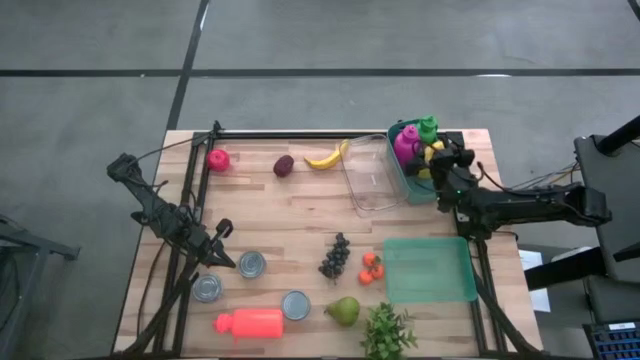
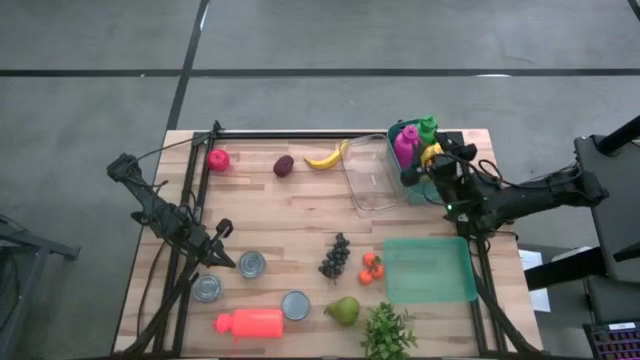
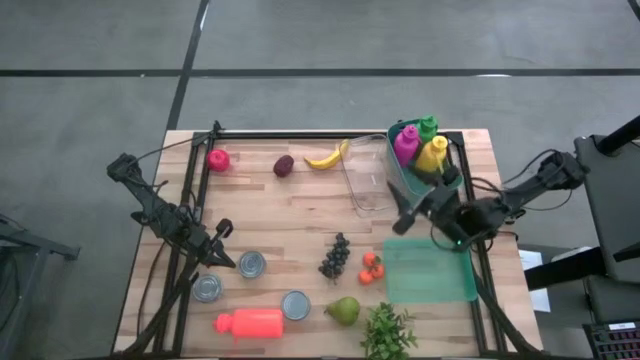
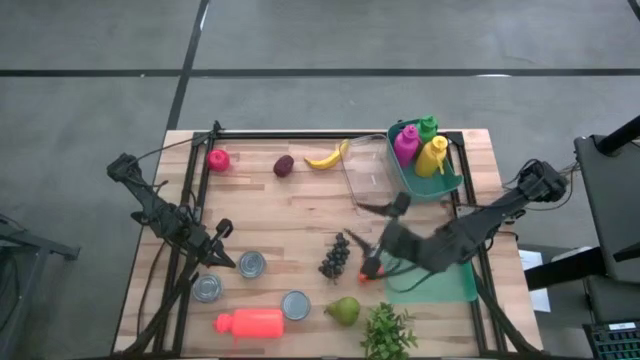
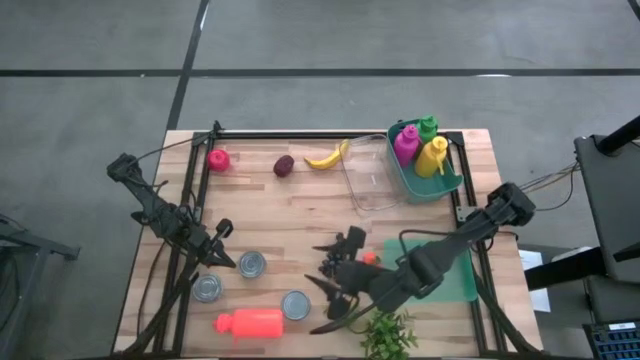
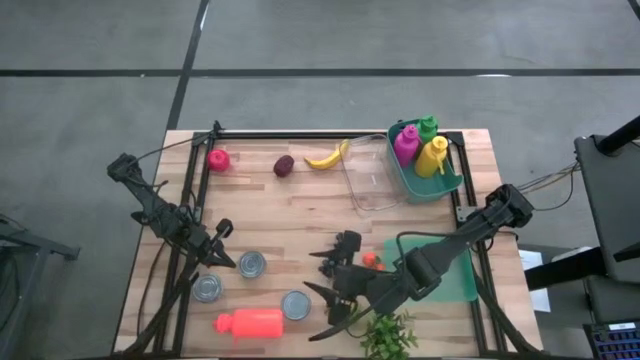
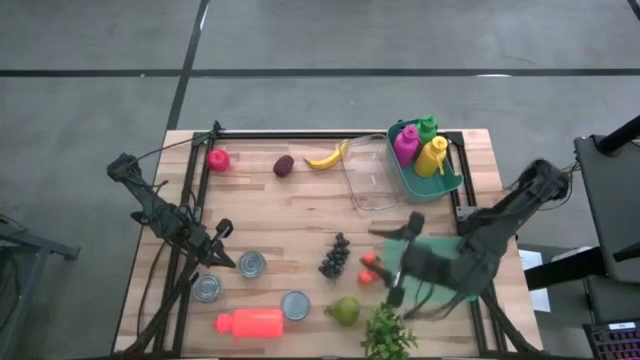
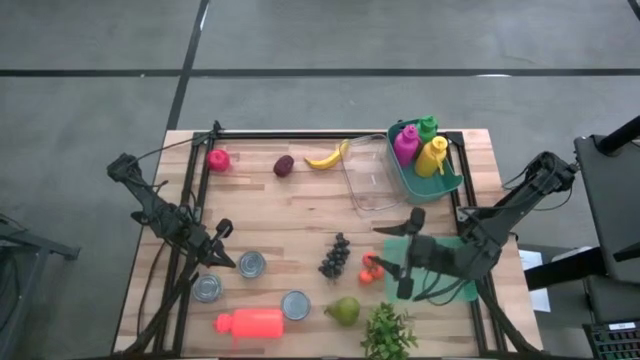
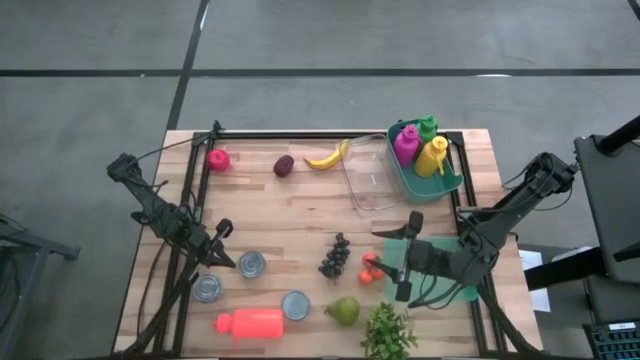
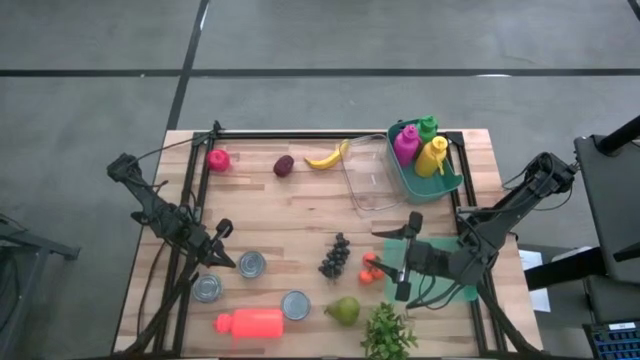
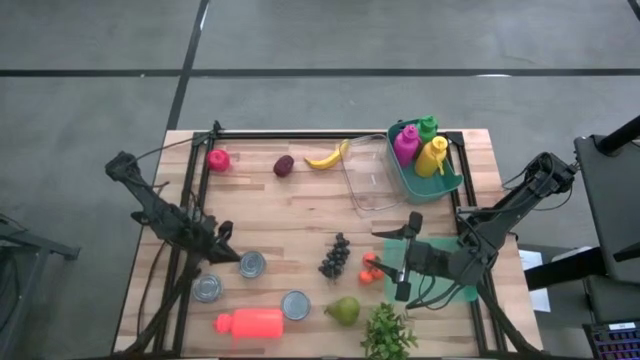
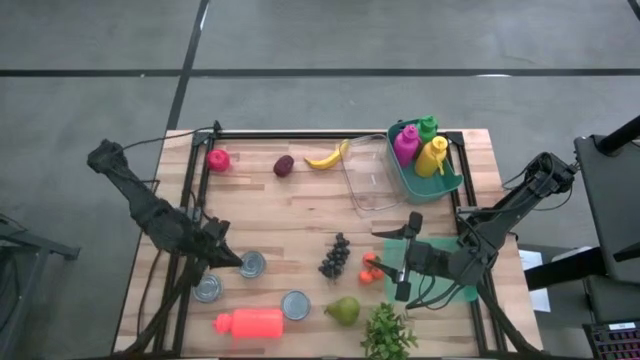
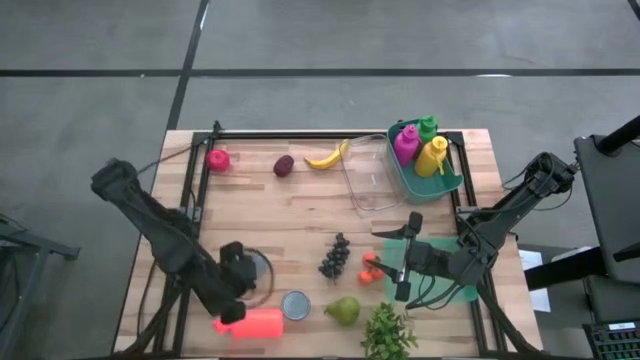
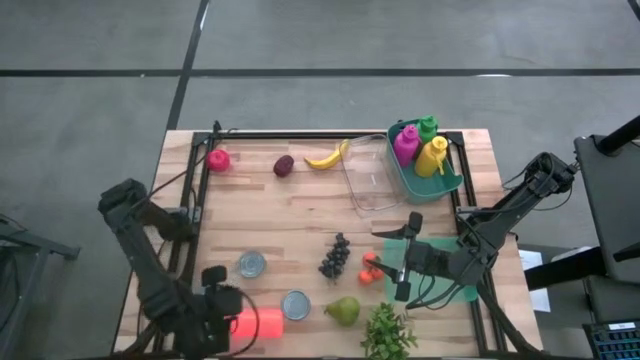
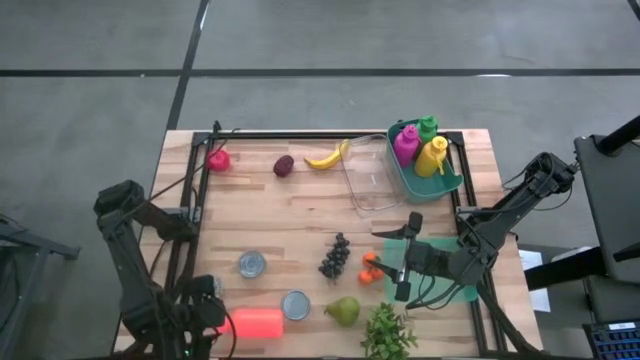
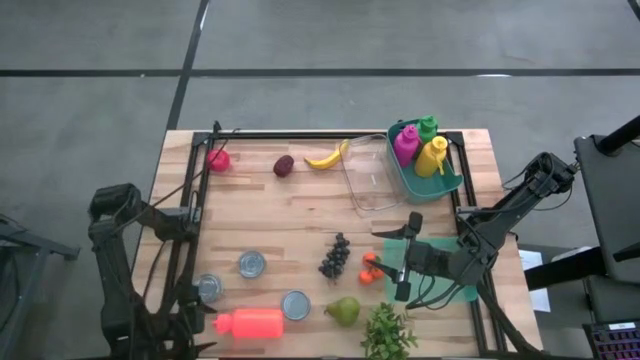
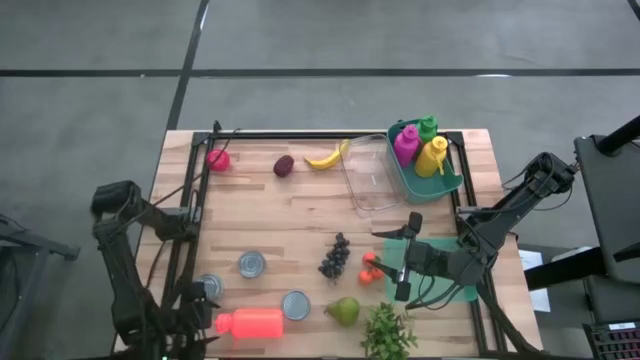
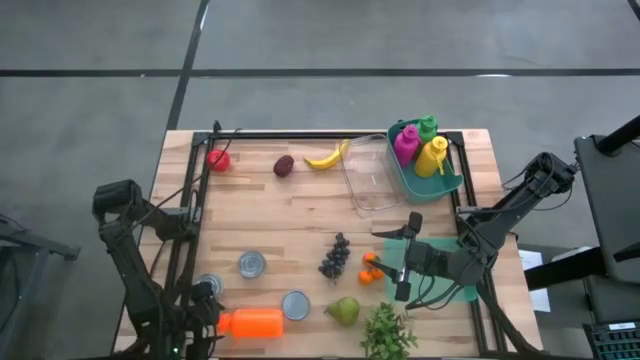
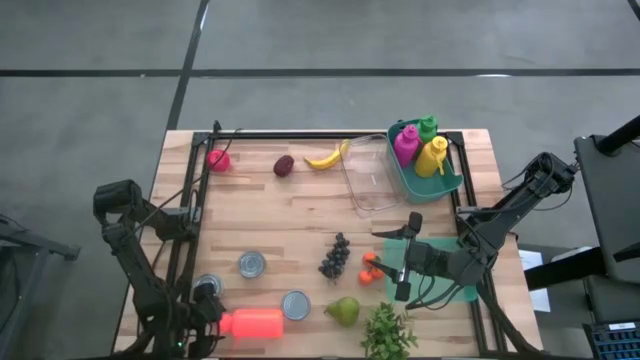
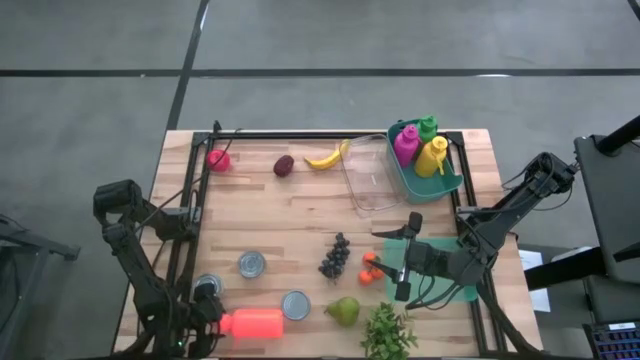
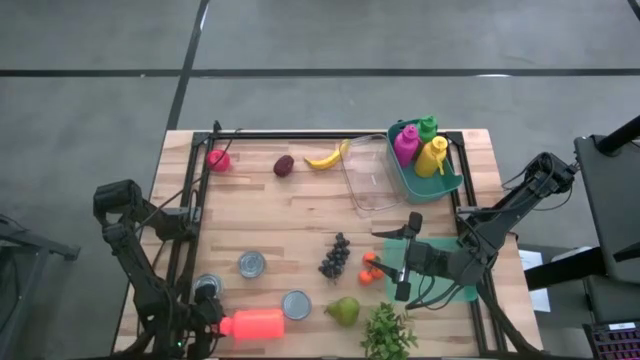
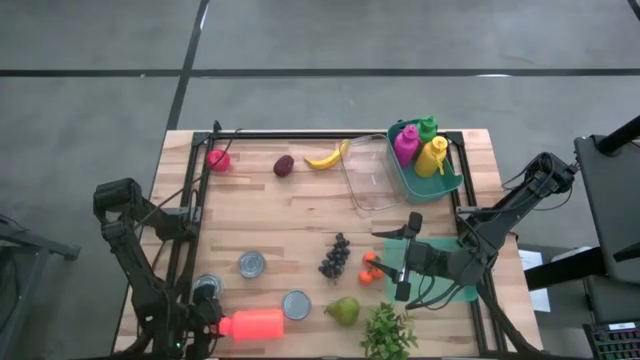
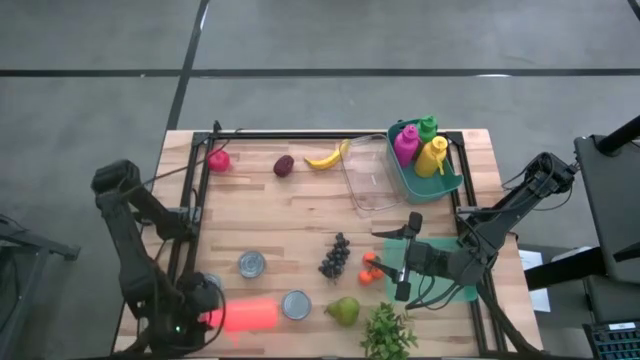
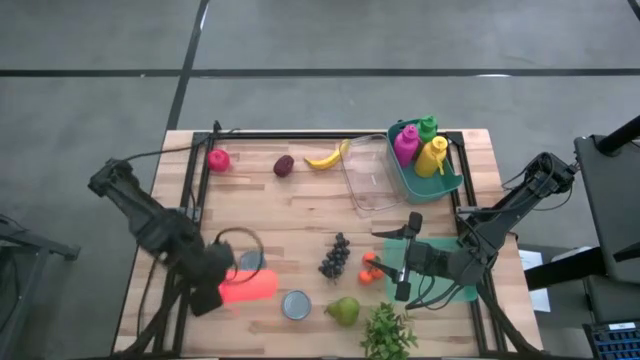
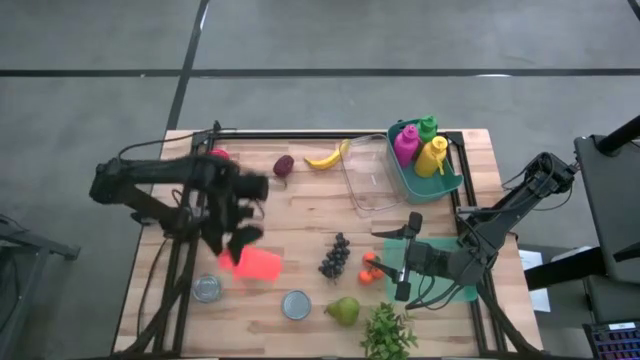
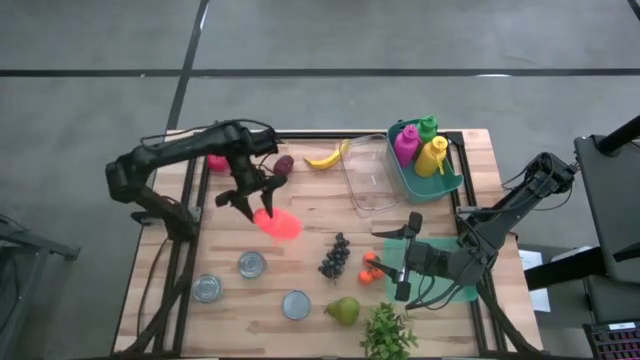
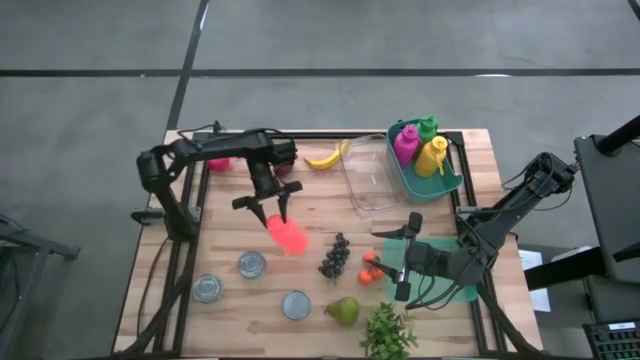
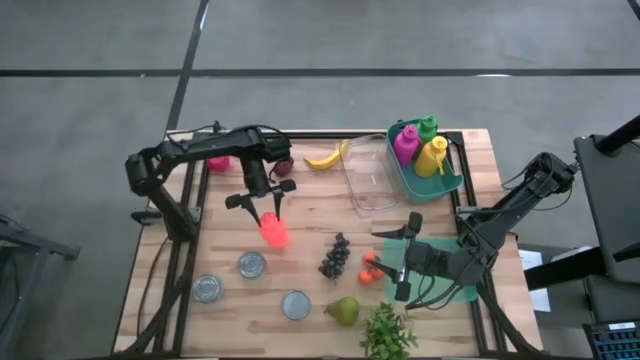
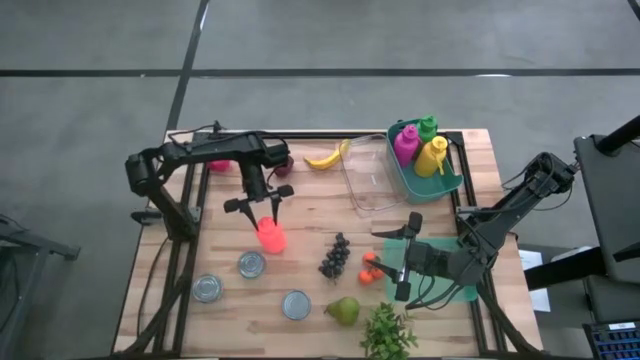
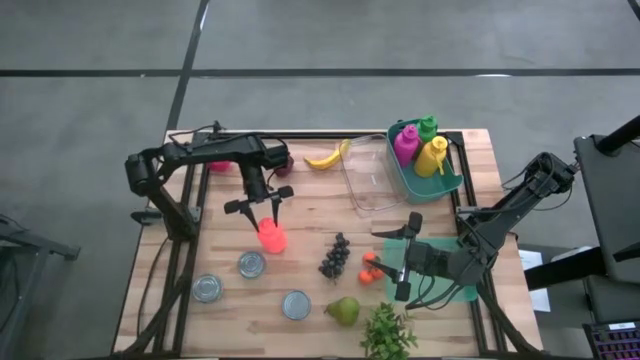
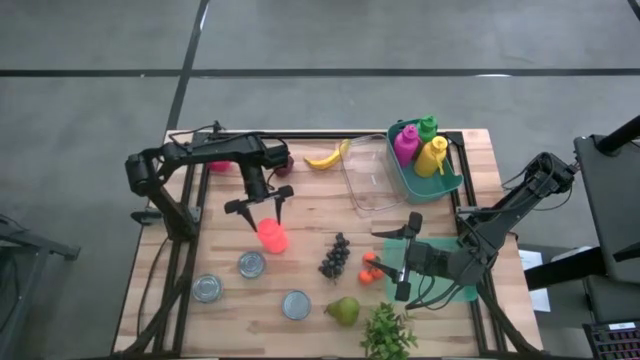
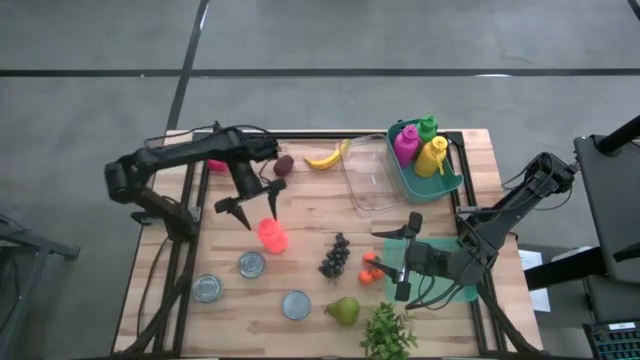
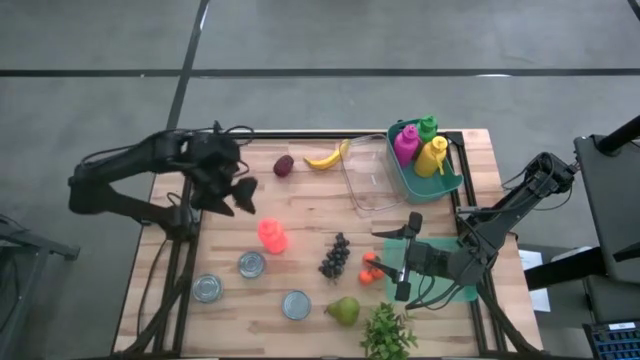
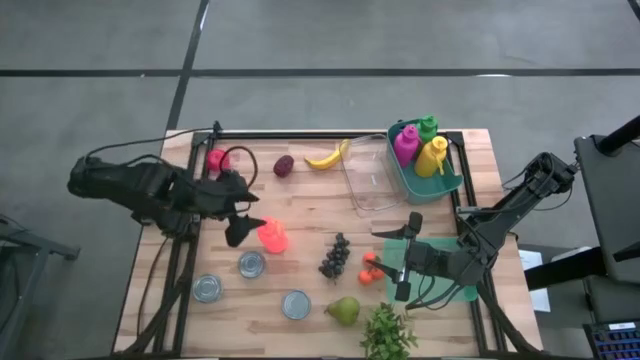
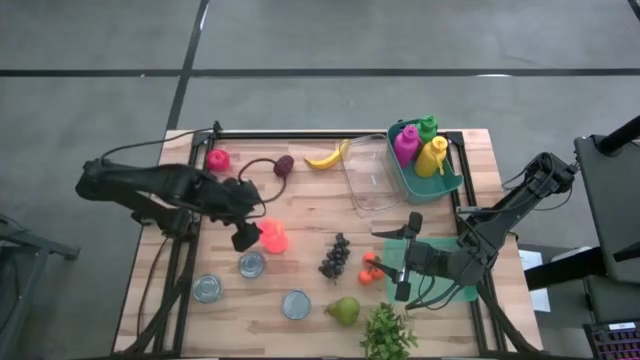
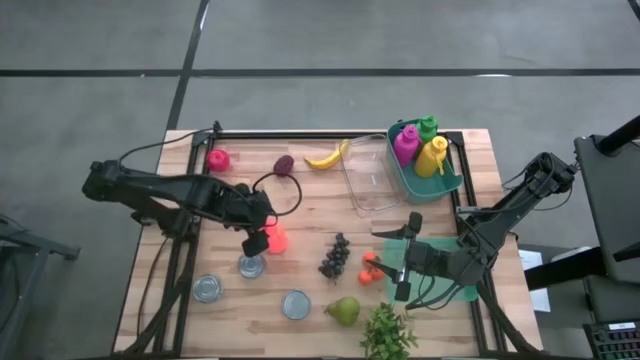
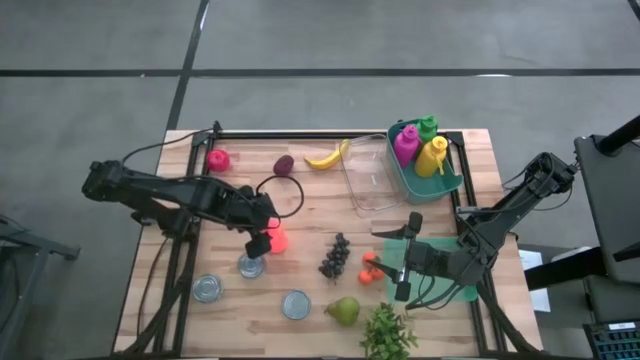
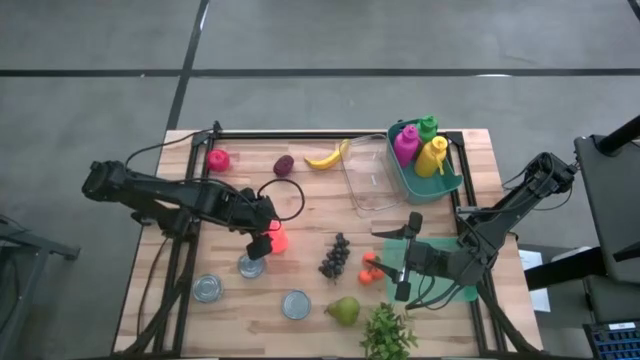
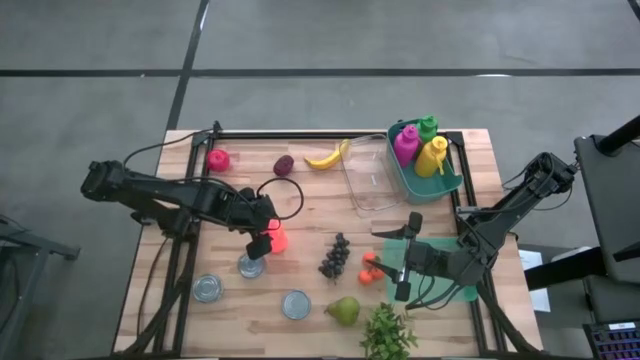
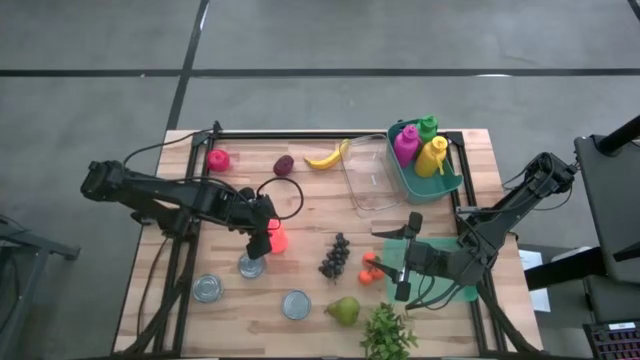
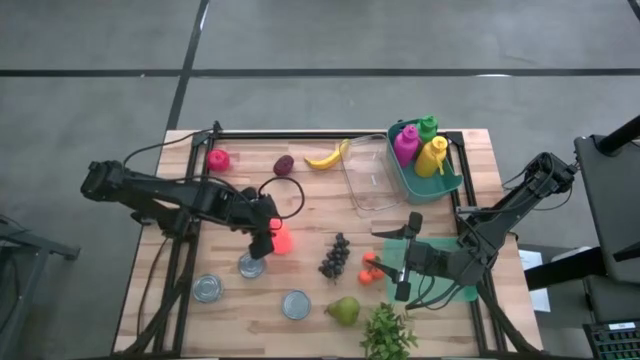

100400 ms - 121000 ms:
Task: Pick & Place Food Item
Put the orange water bottle into the green bin

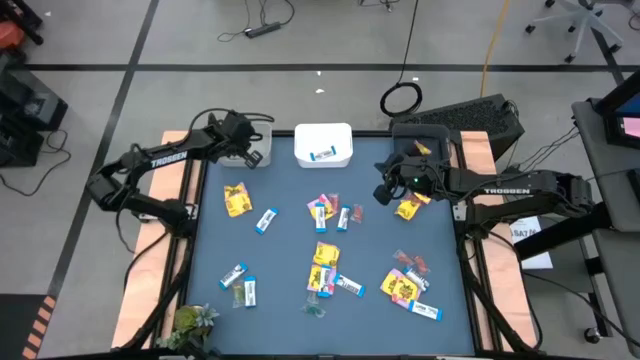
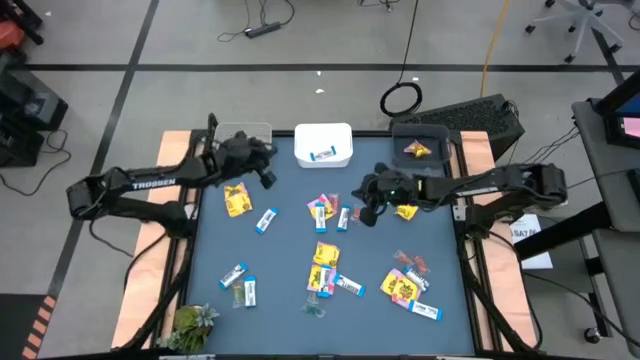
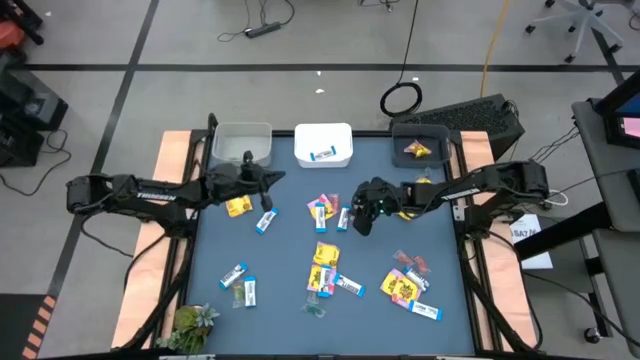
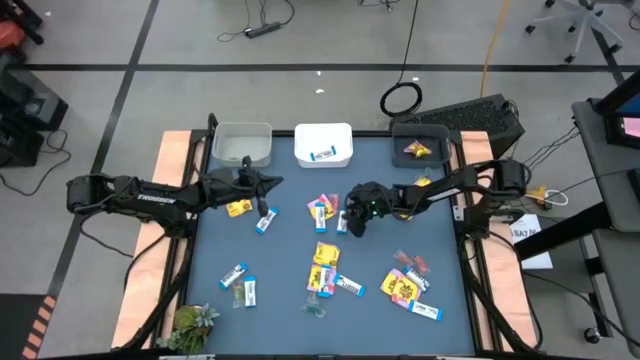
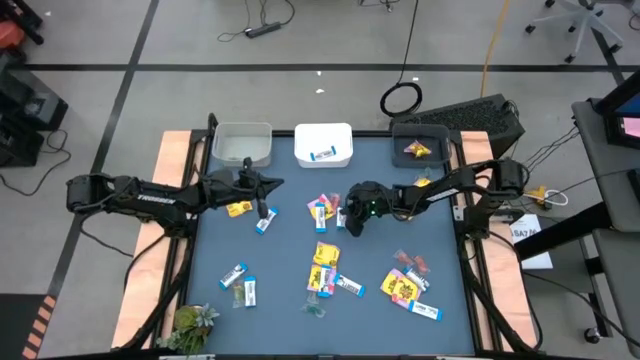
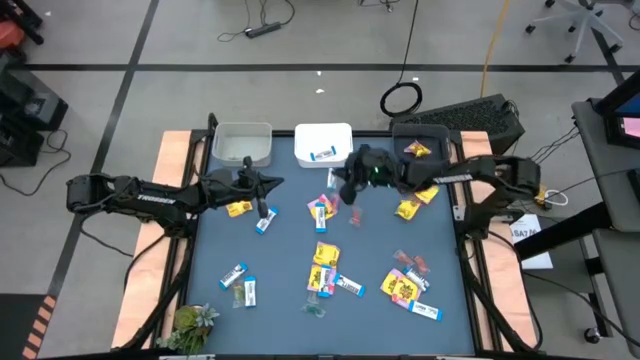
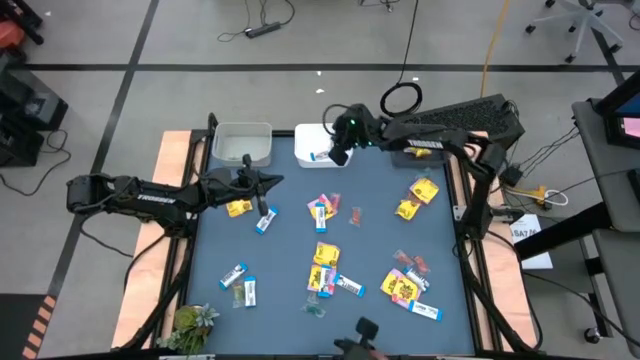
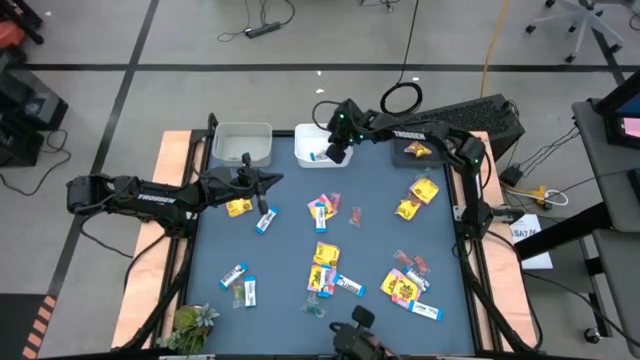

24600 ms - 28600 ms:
Task: Sort candy
Put the white chocolate into the white bin
